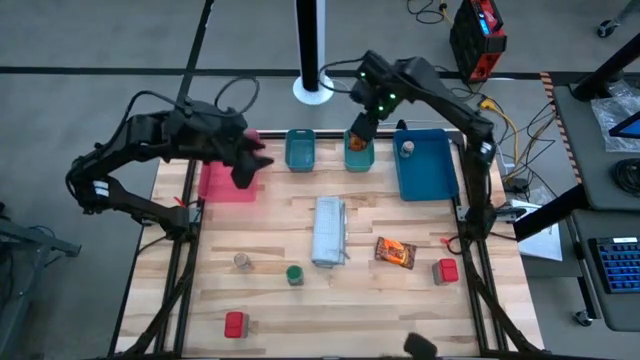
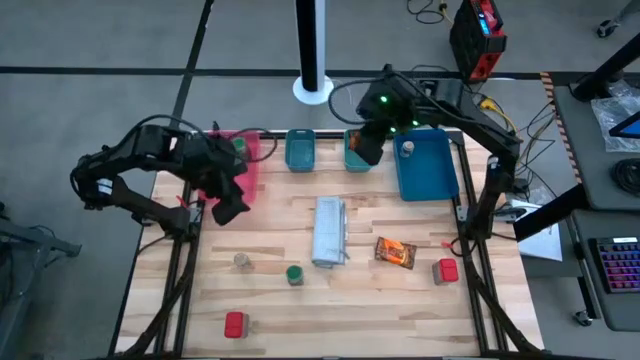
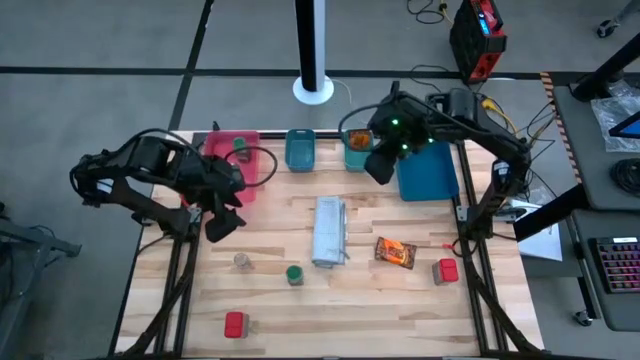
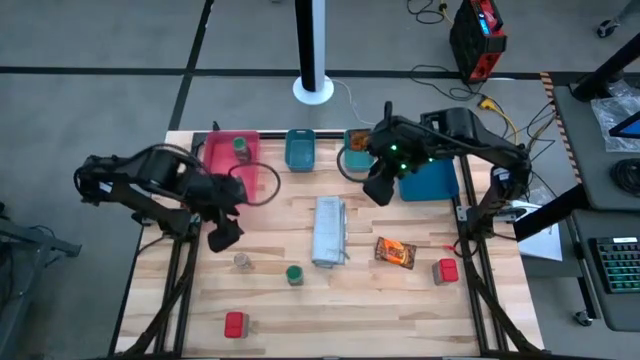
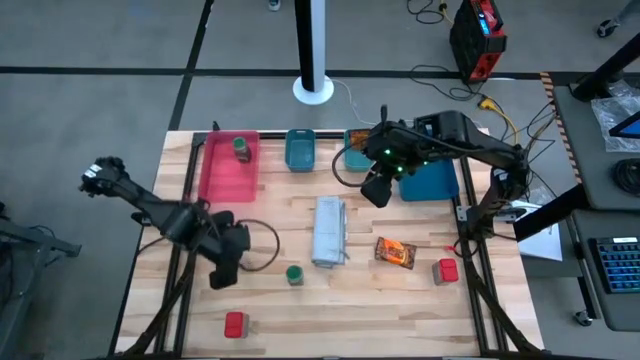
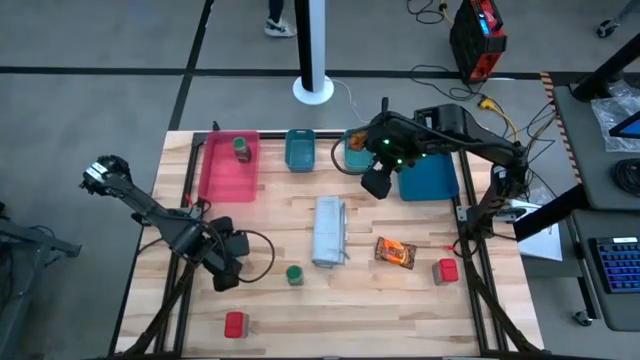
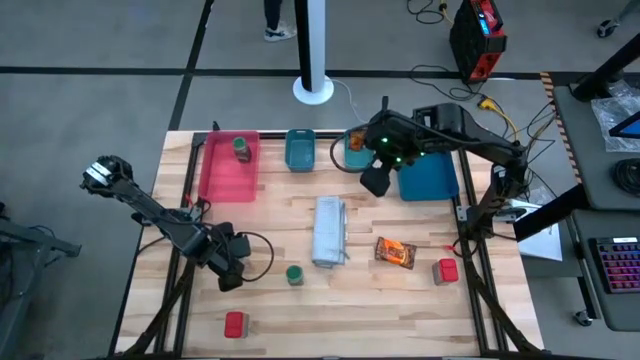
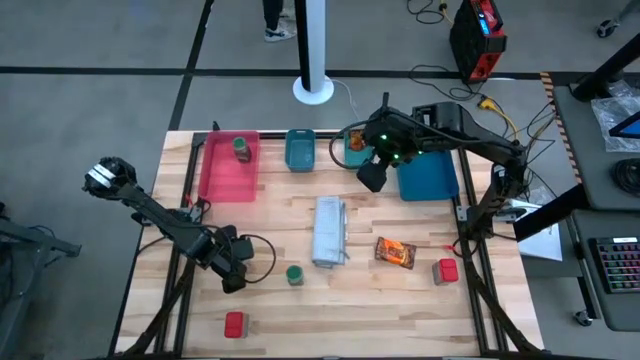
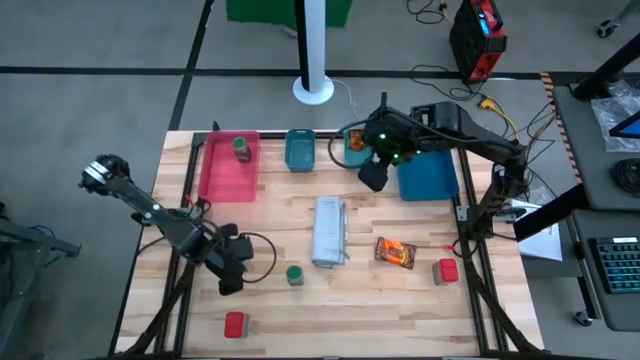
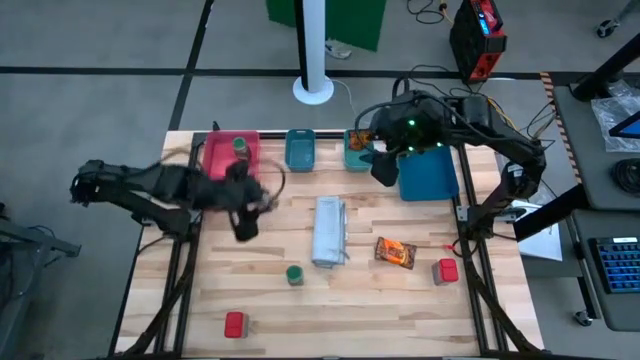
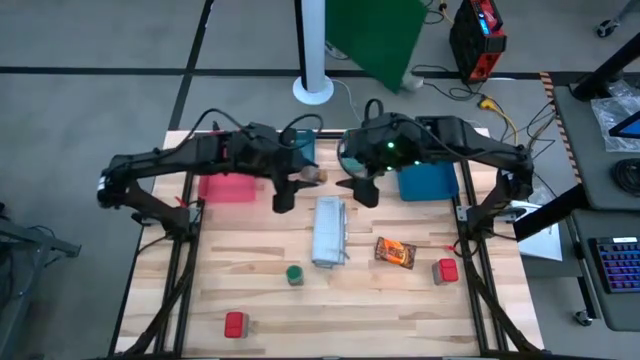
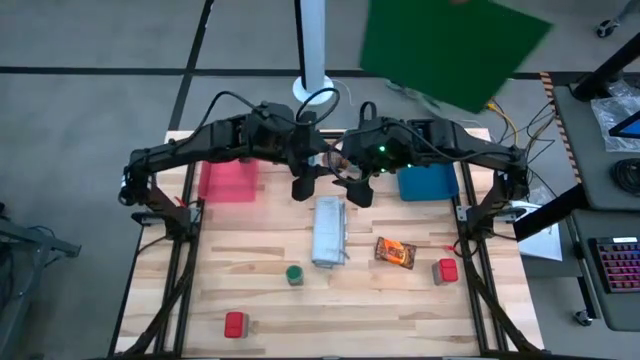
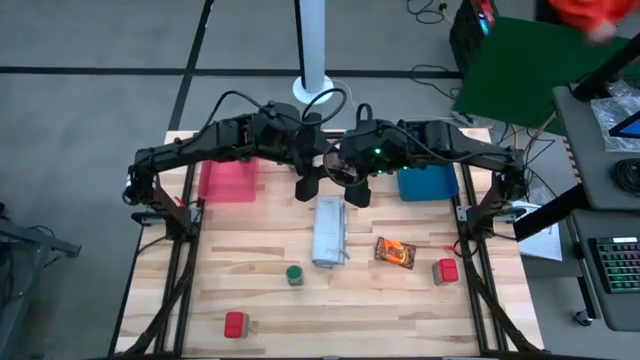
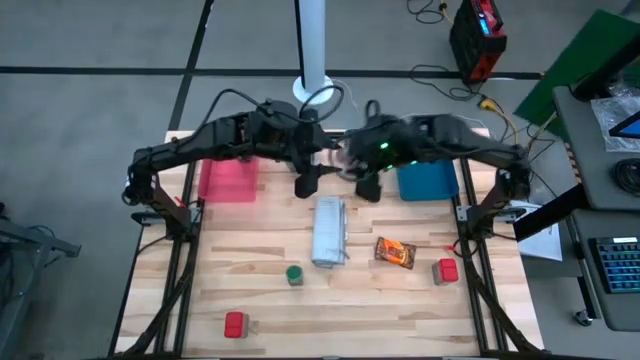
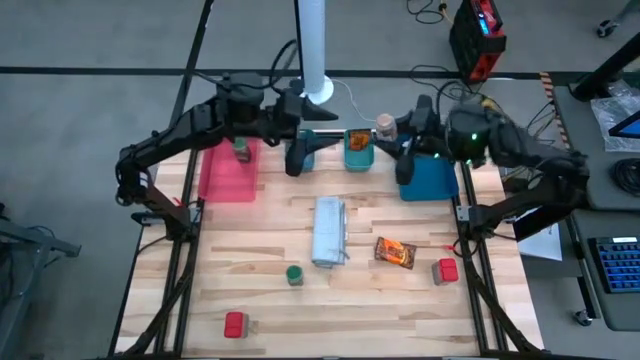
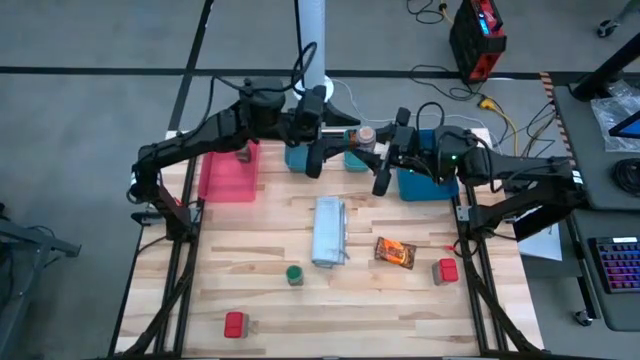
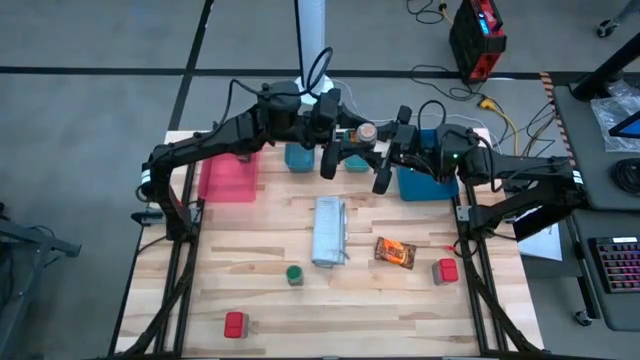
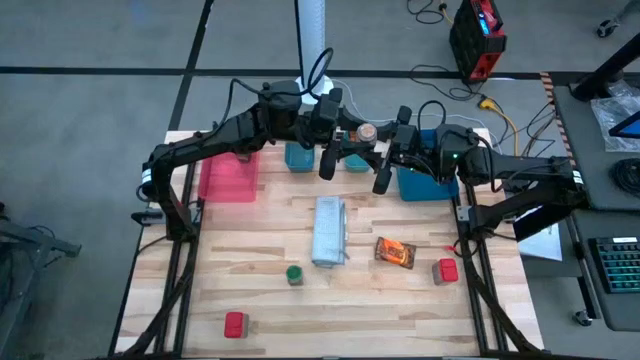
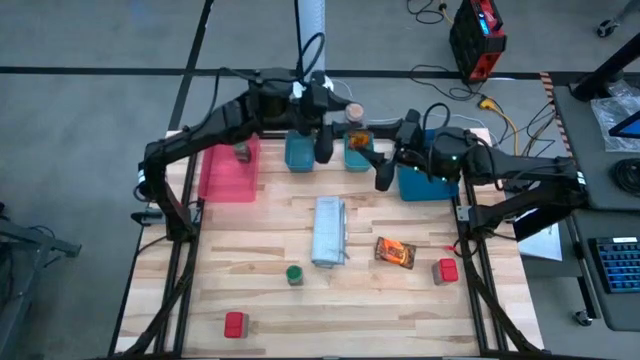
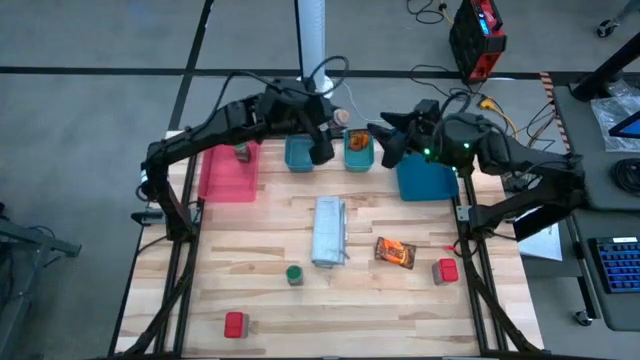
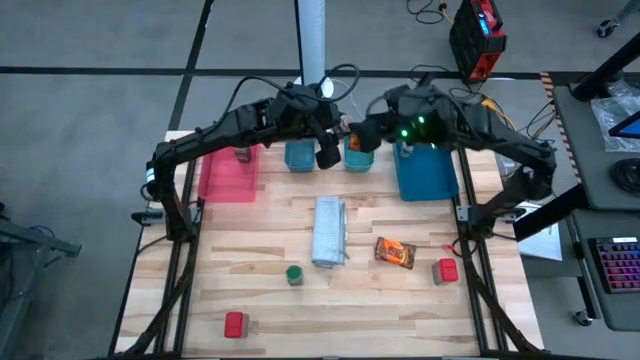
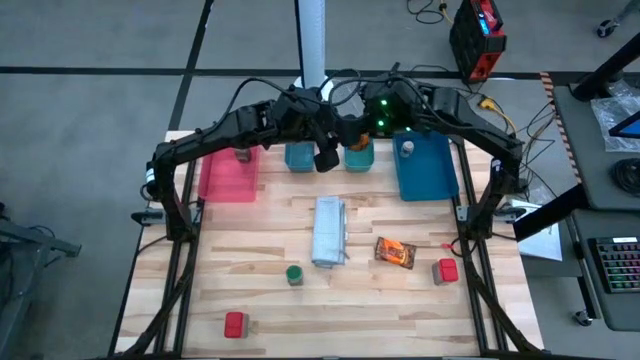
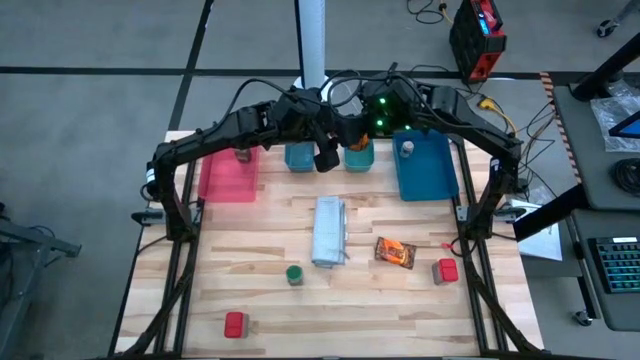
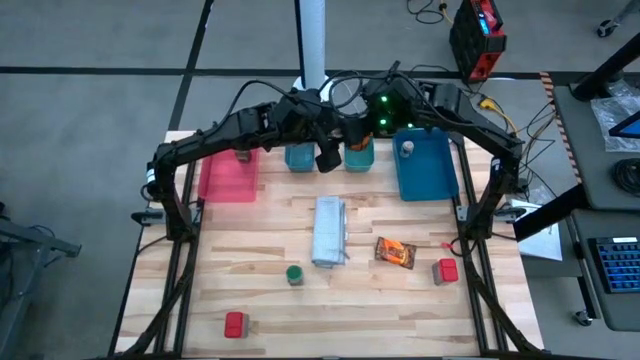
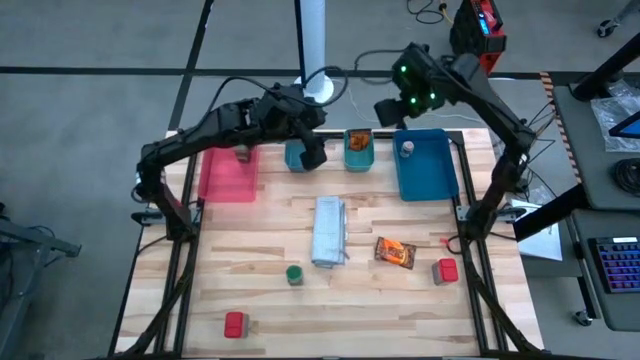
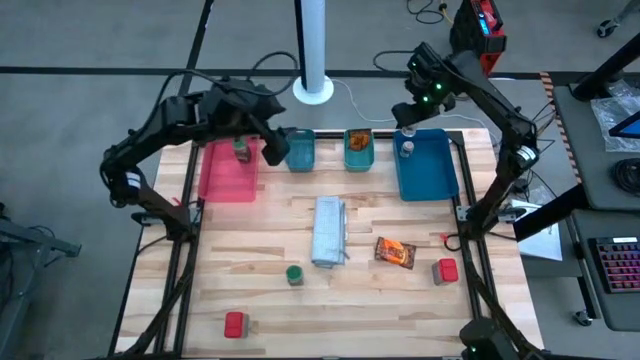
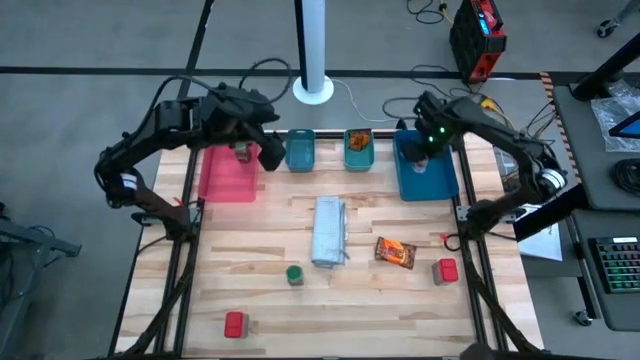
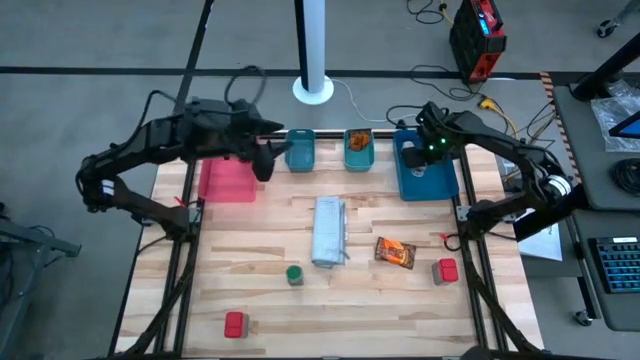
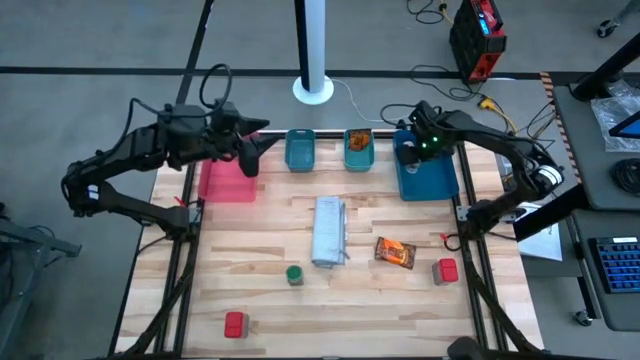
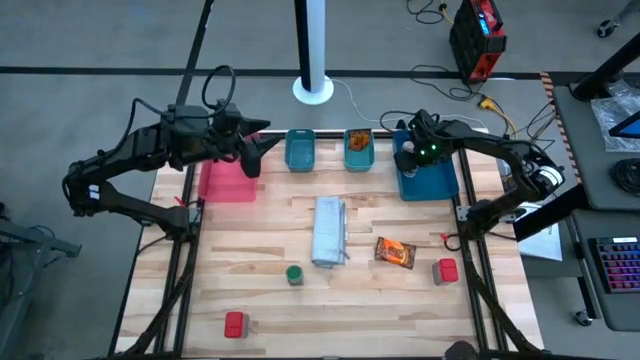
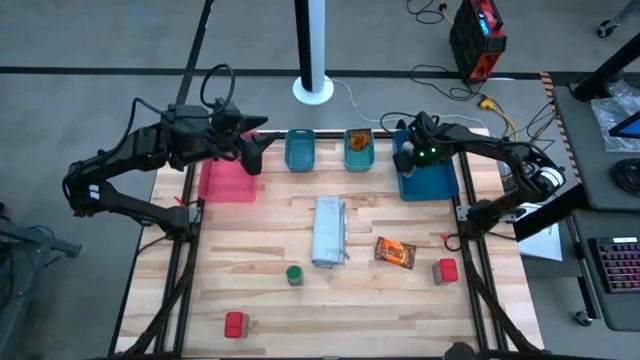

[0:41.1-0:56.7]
Task: Sort spices by type
Put the brown seasoning bottle into the blue bin

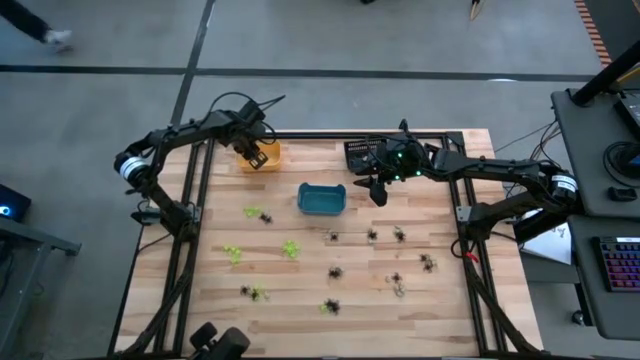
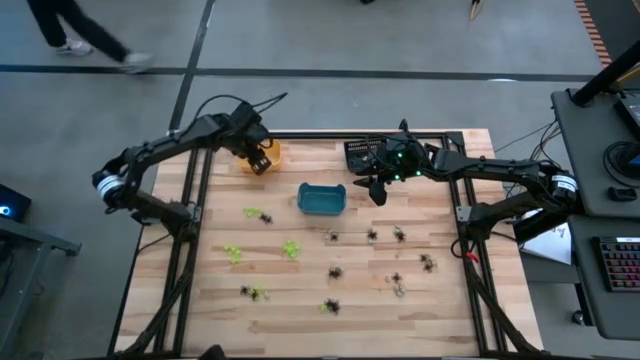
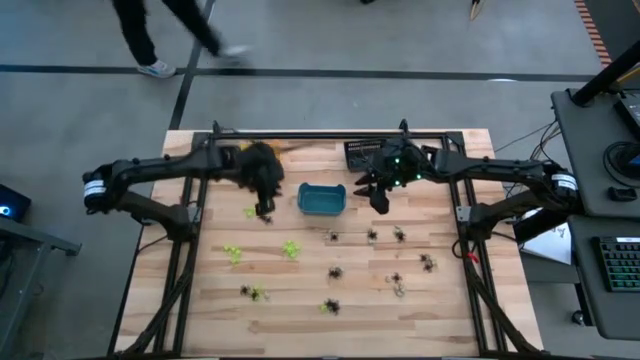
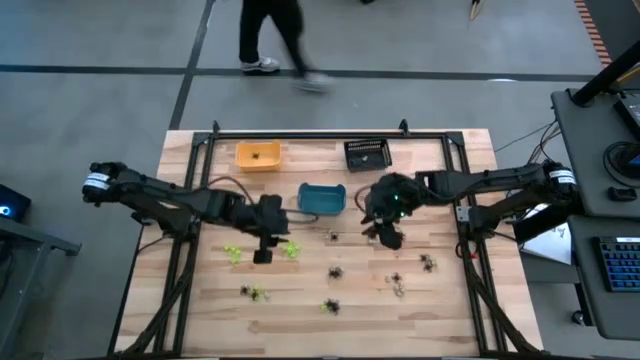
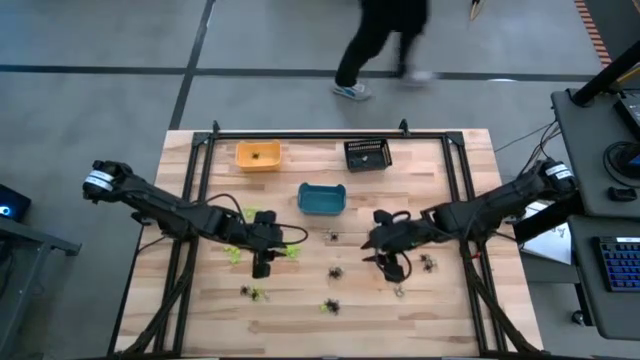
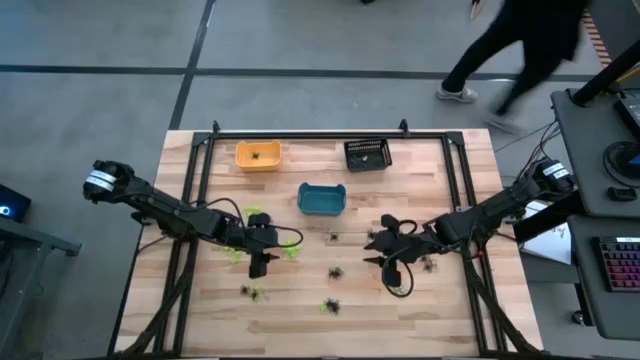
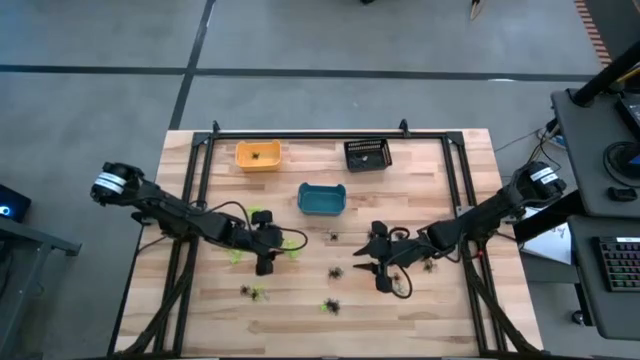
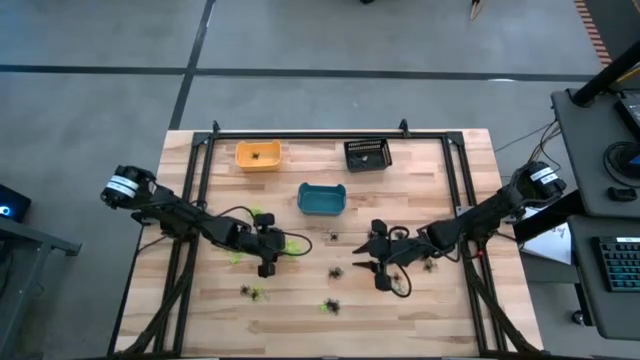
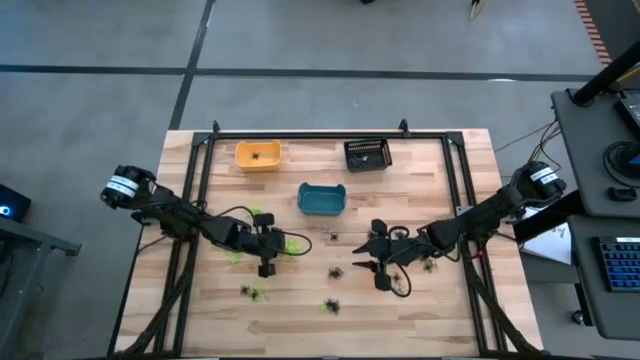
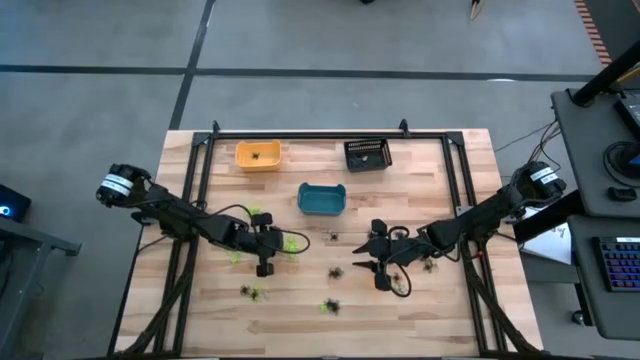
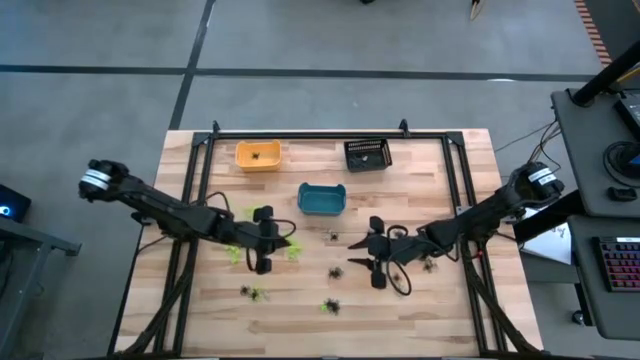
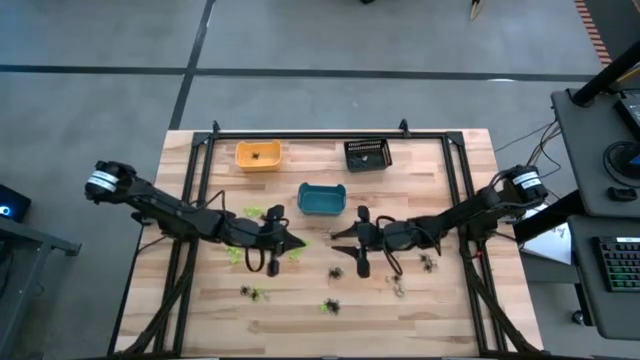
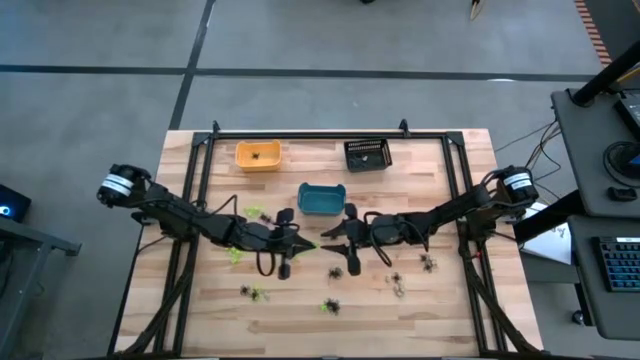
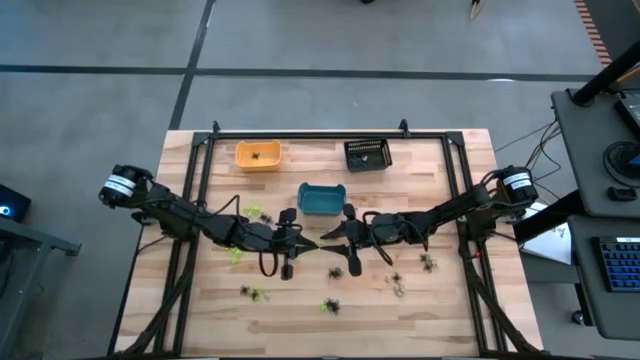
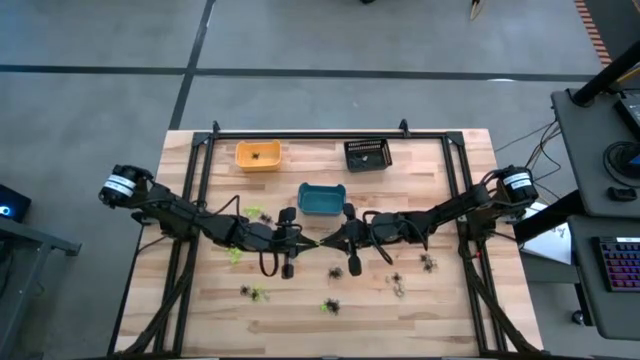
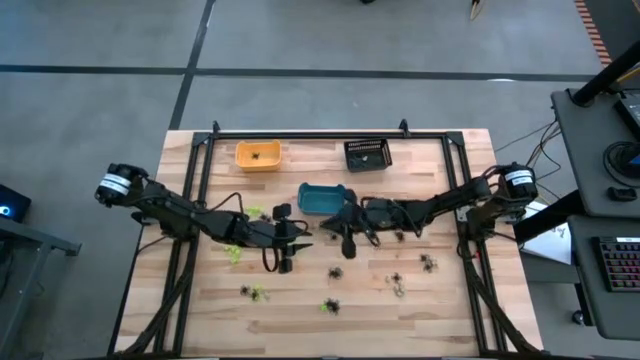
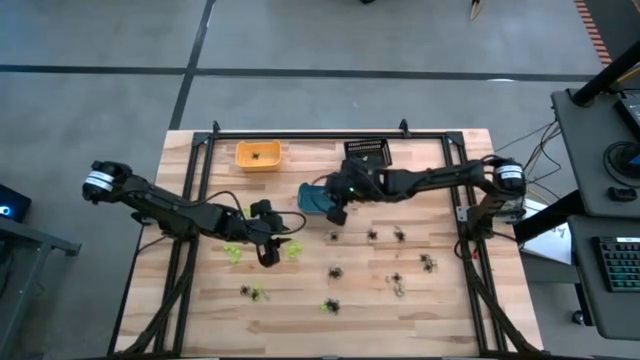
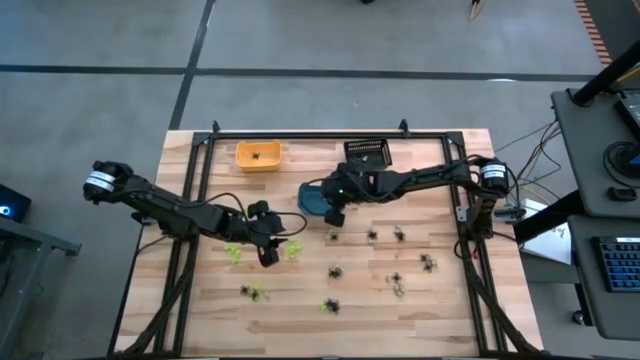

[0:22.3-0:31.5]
Task: Sort Halloween decoration
Put the green spider toy into the blue bin
